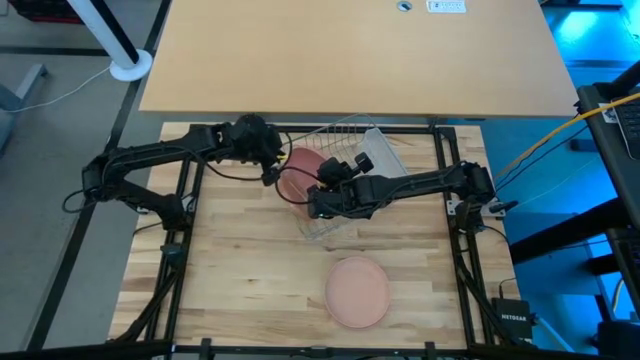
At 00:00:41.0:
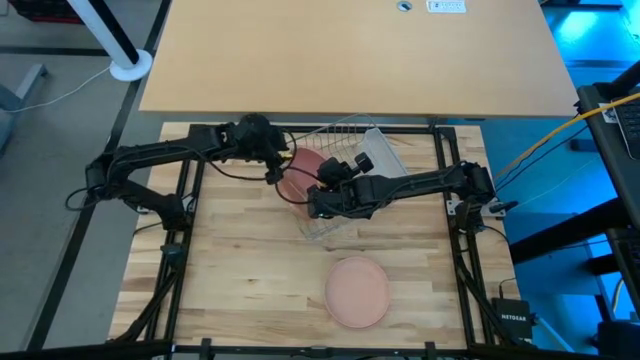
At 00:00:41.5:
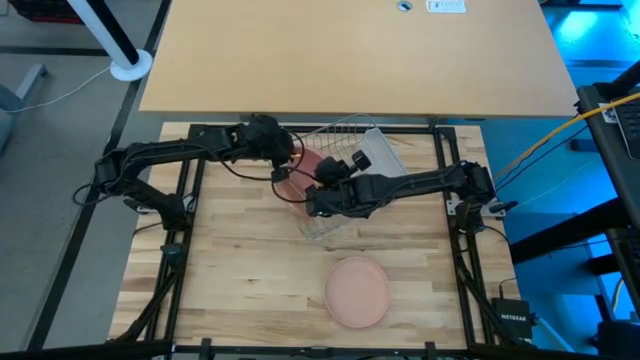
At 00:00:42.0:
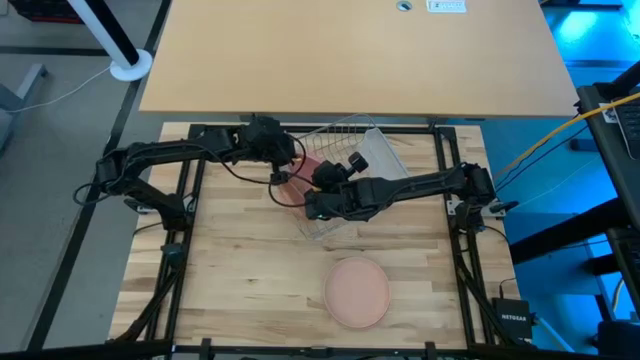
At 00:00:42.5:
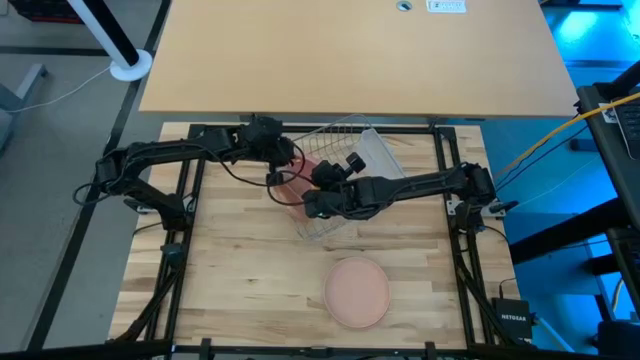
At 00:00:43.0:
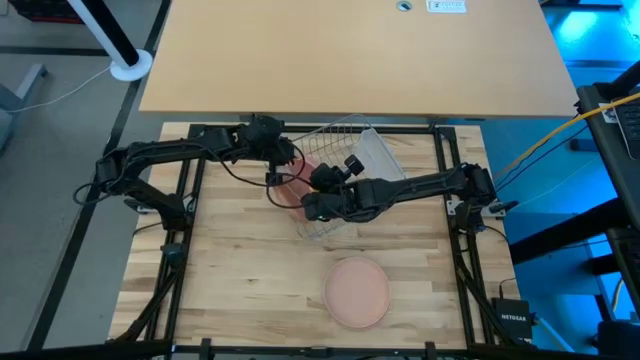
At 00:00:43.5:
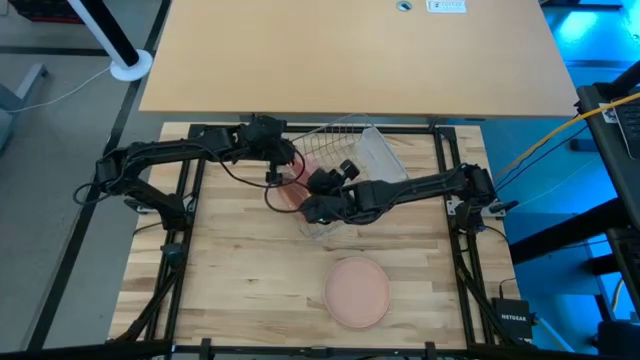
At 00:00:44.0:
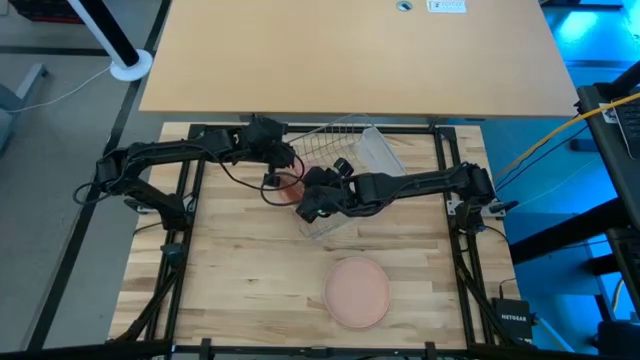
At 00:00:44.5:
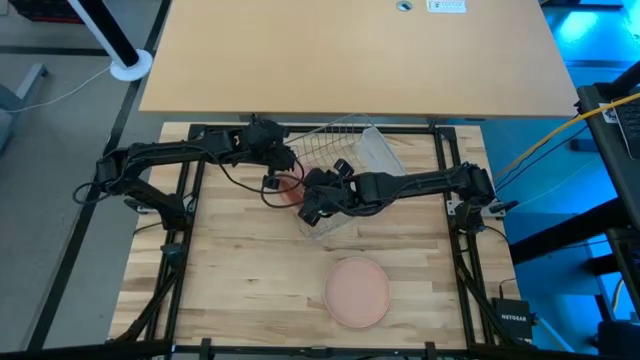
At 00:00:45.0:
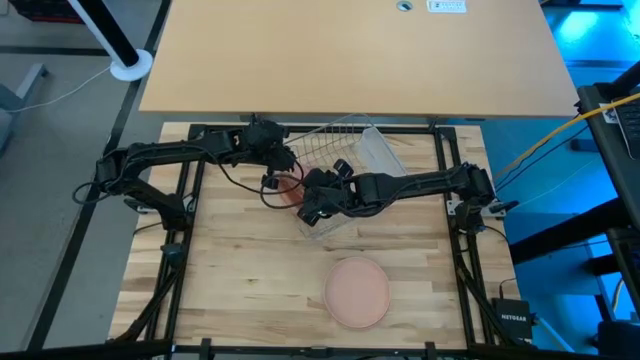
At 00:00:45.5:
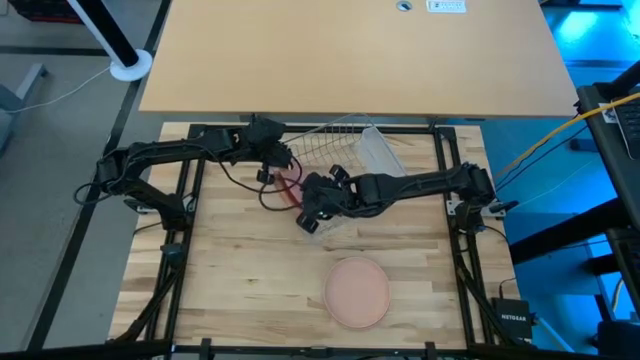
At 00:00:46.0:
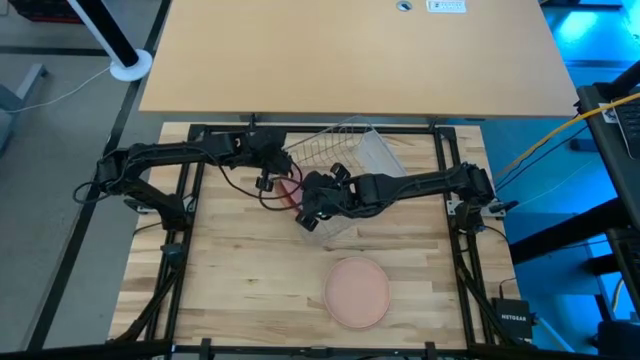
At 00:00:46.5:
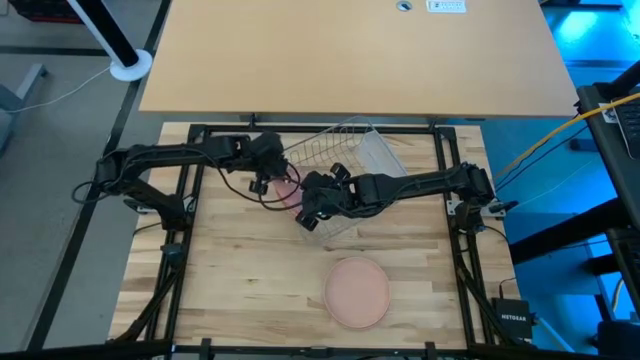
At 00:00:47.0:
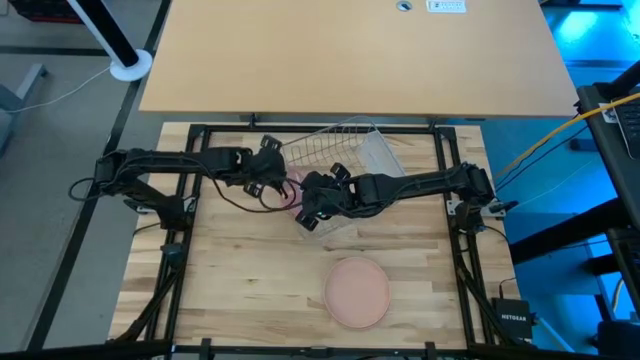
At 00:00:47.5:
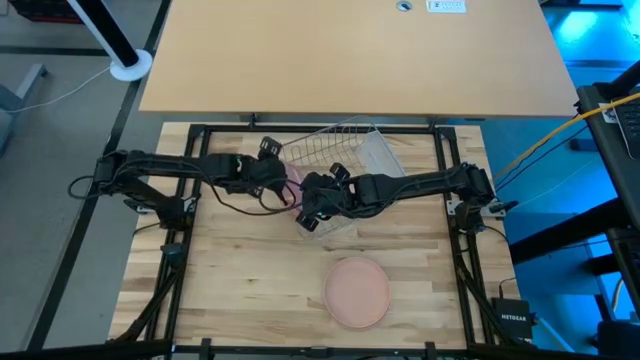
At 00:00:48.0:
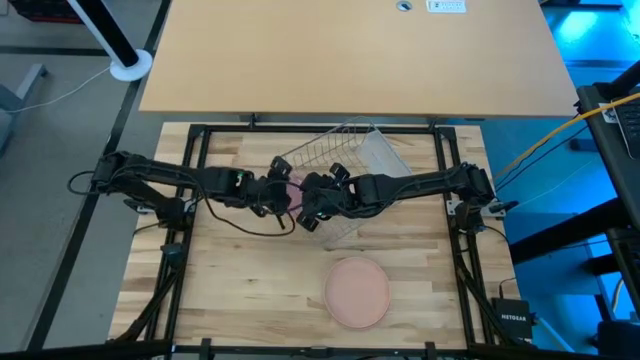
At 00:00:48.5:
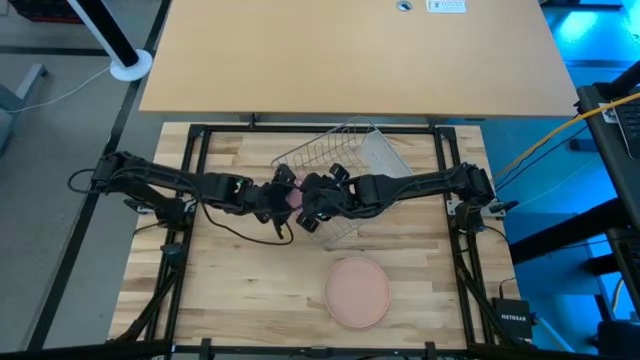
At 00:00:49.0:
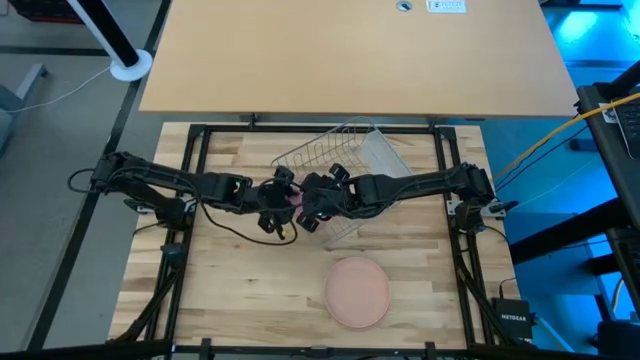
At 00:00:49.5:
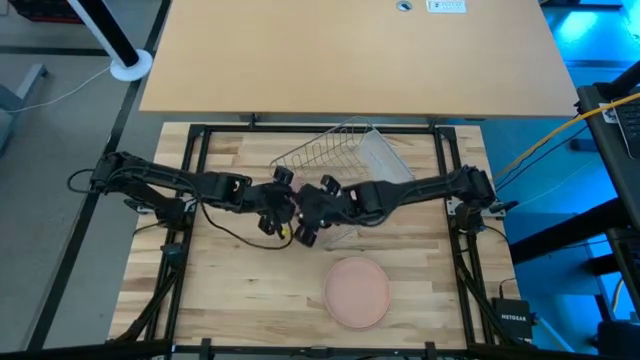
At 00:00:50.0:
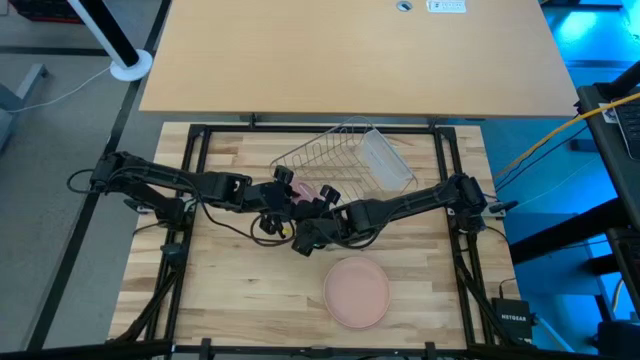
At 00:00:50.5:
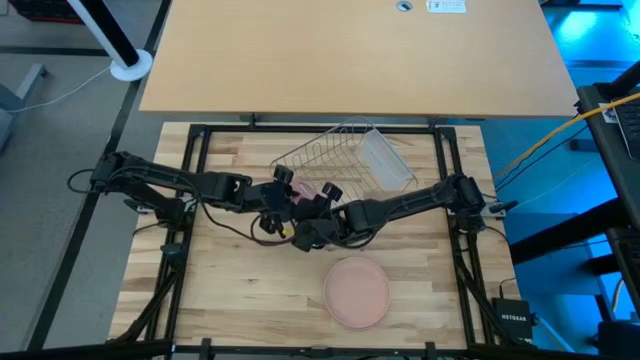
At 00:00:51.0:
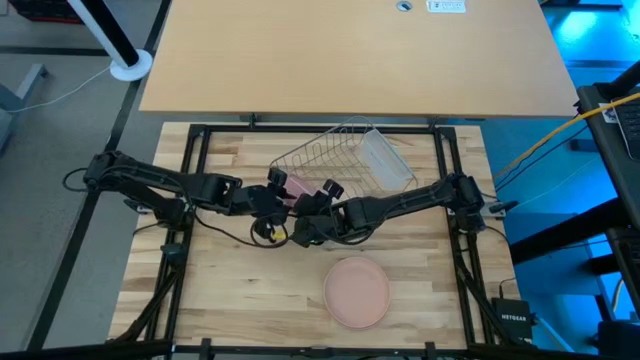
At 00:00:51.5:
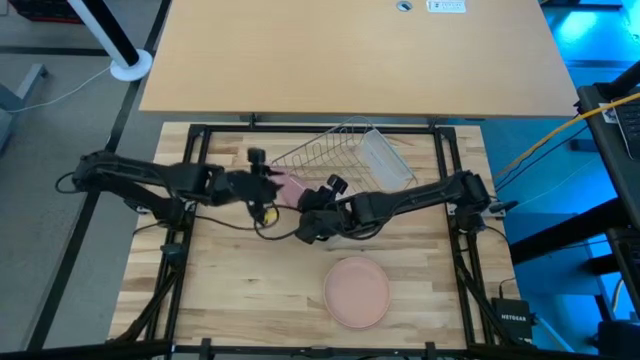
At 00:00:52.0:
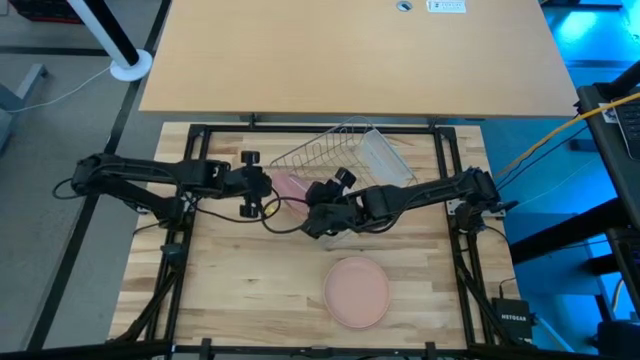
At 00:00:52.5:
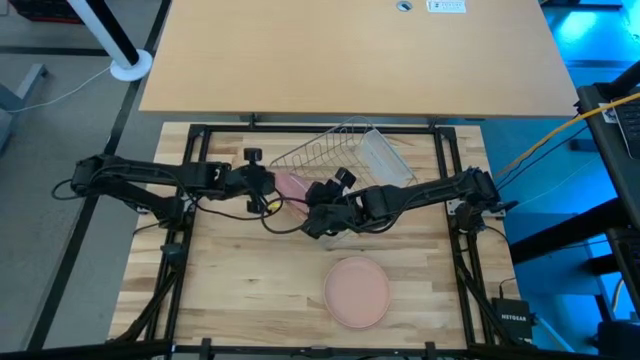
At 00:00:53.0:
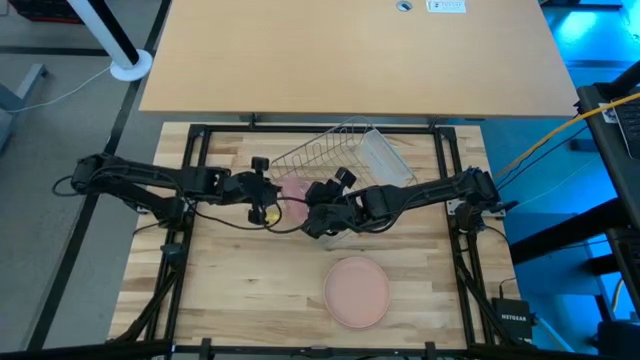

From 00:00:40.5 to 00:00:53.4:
Task: Sort dishes
Put the light pink plate into the dish rack

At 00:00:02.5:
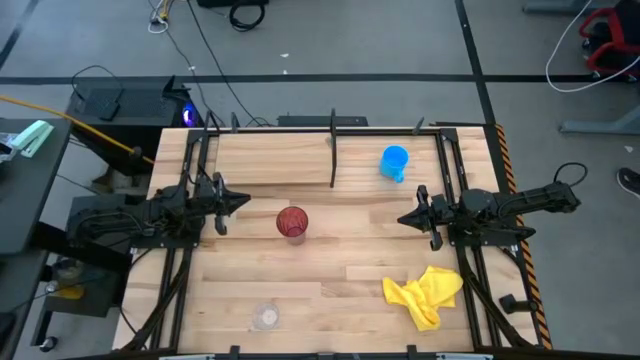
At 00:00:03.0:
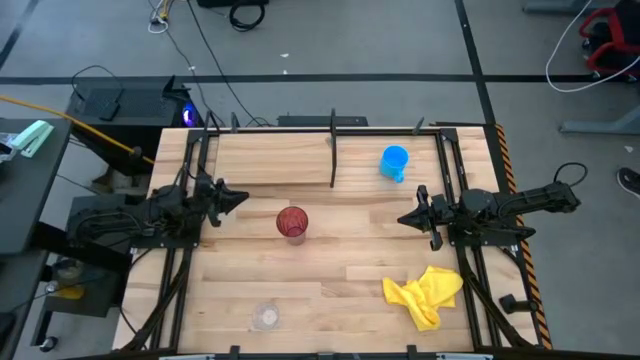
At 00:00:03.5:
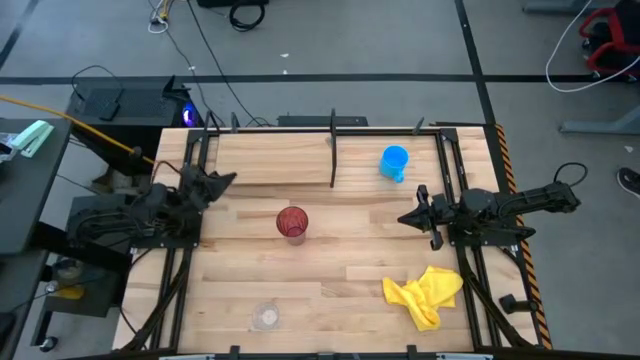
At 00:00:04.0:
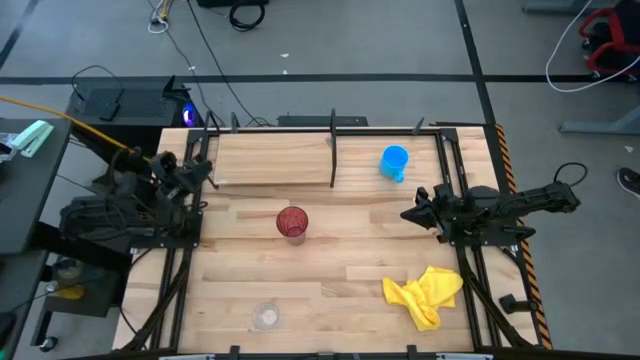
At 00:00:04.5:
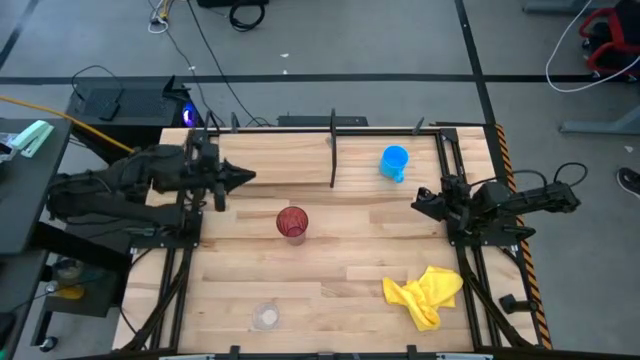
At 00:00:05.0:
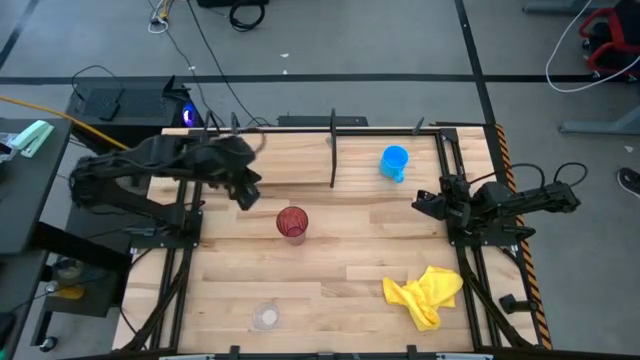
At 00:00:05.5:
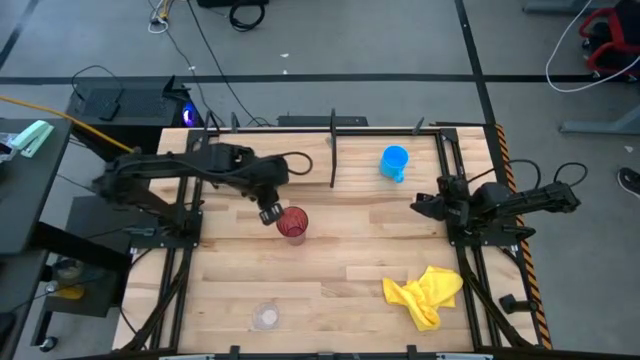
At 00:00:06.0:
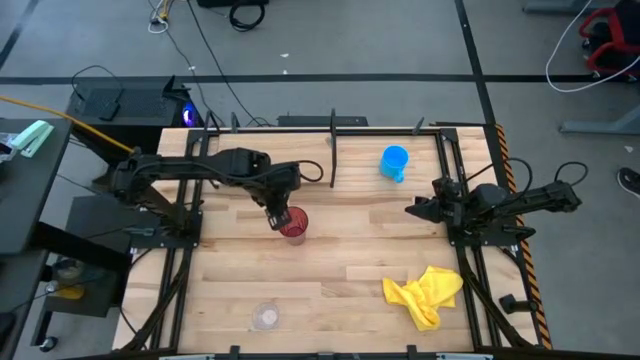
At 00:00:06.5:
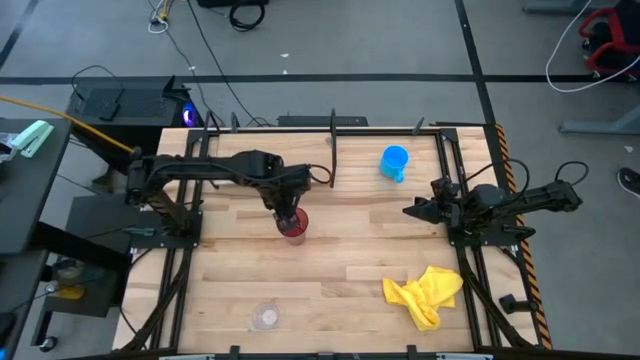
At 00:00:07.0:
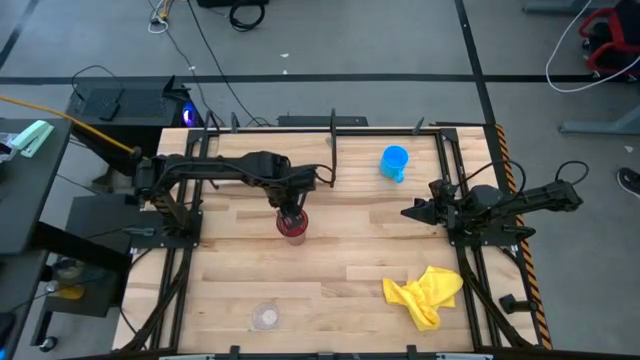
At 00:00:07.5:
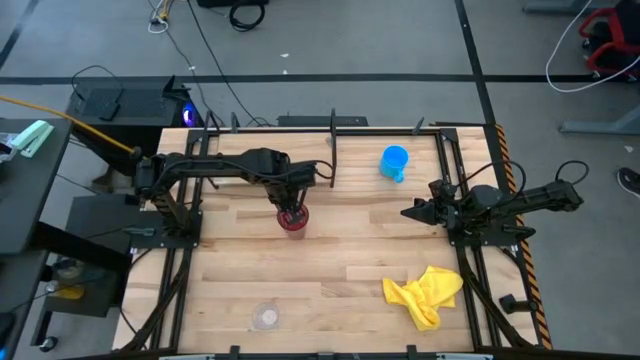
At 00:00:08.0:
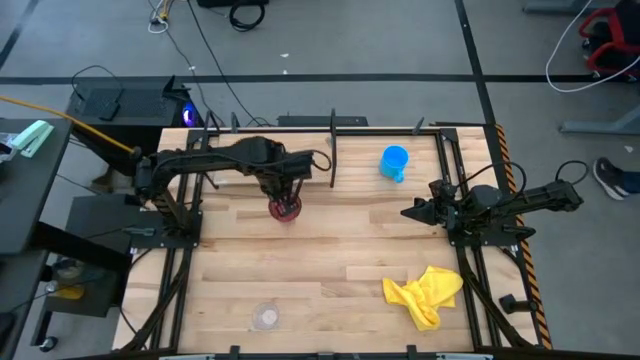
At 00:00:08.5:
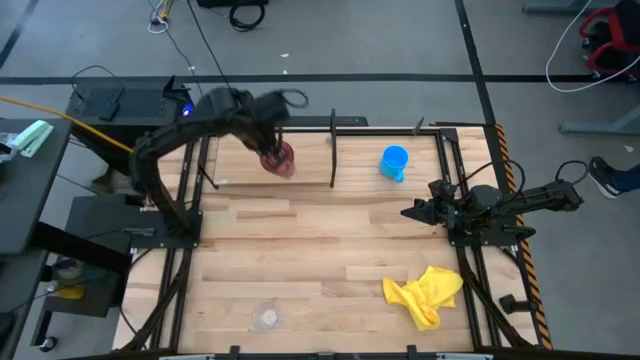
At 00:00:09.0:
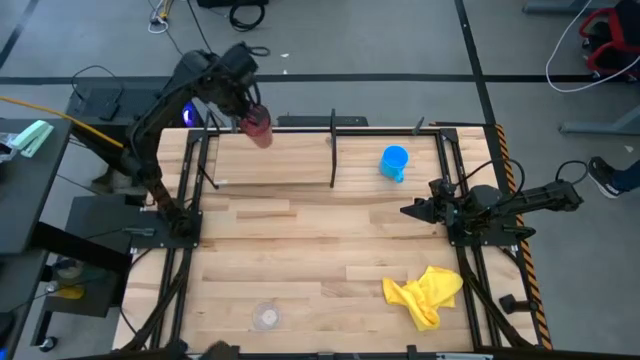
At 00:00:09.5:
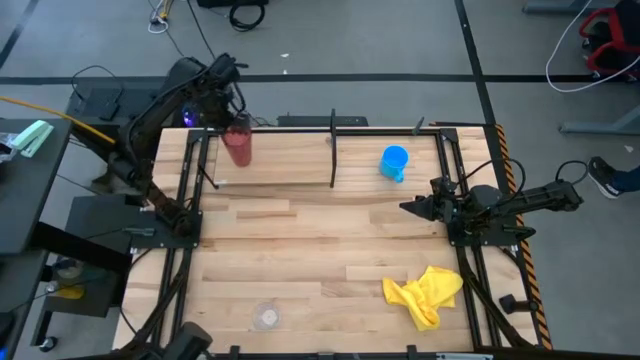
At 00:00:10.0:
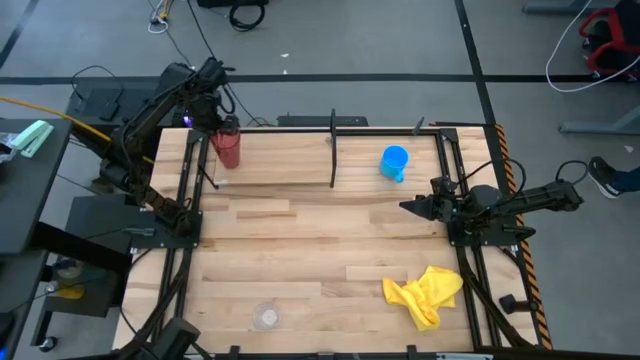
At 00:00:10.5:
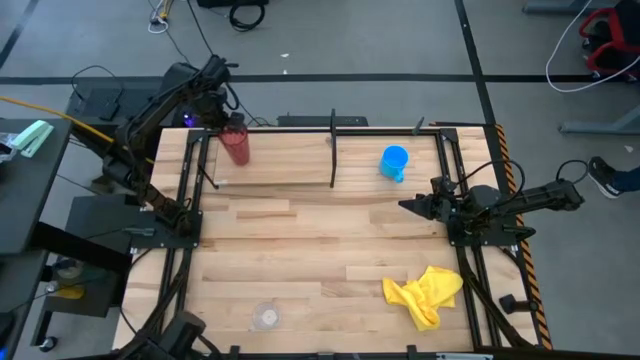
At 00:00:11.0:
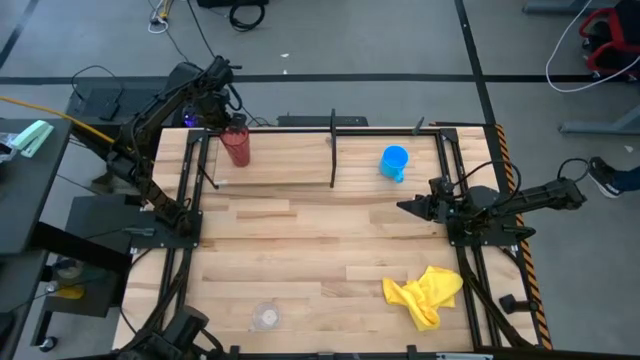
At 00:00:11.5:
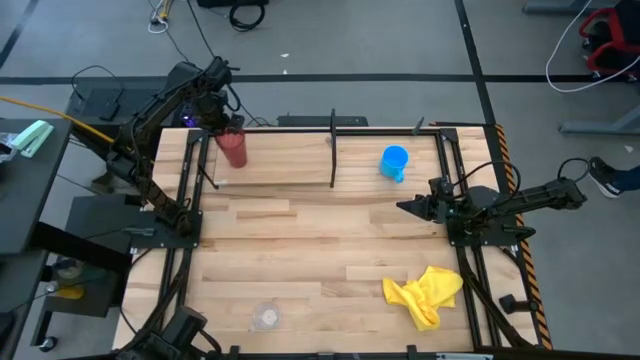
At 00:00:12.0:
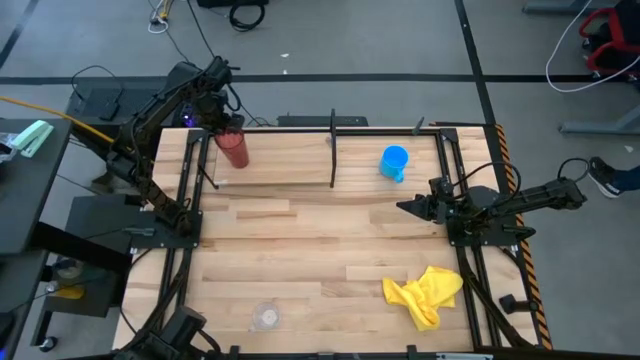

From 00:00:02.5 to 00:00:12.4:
Task: Stack small to large cups/mugs on shelf
Put the red cup on the shelf
